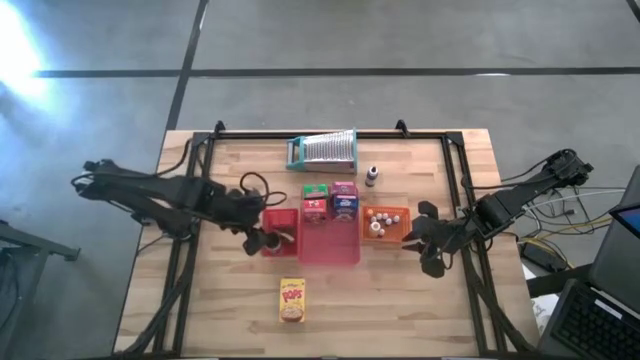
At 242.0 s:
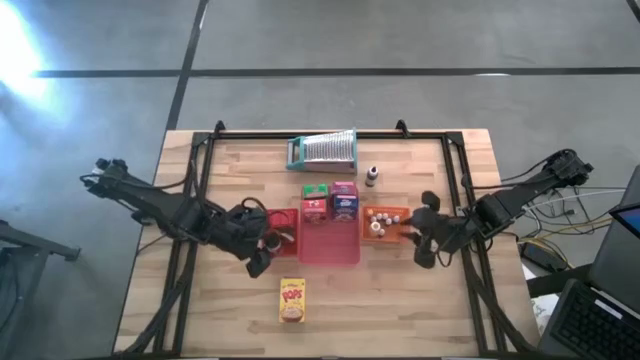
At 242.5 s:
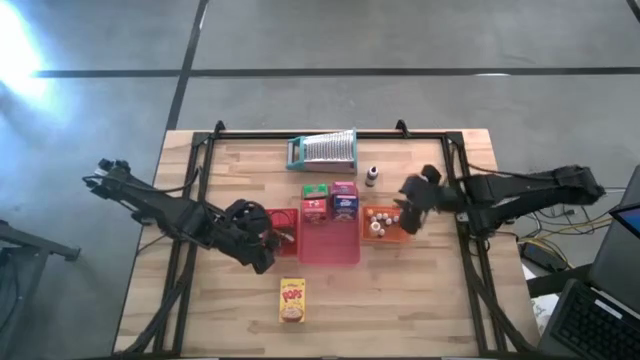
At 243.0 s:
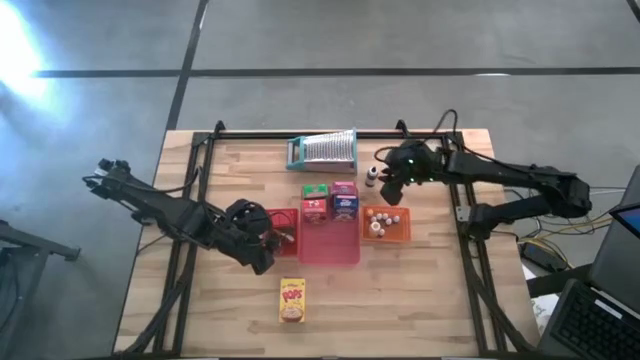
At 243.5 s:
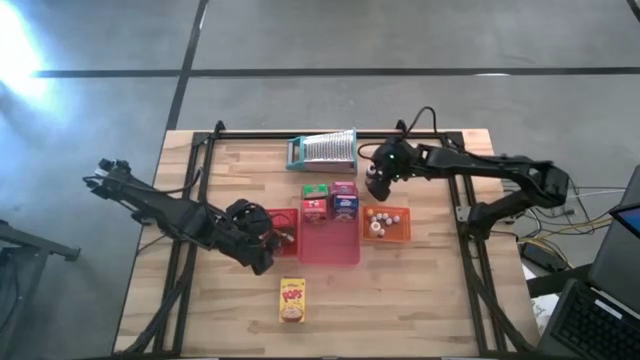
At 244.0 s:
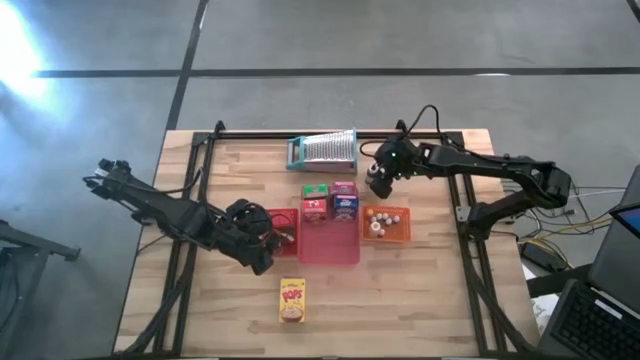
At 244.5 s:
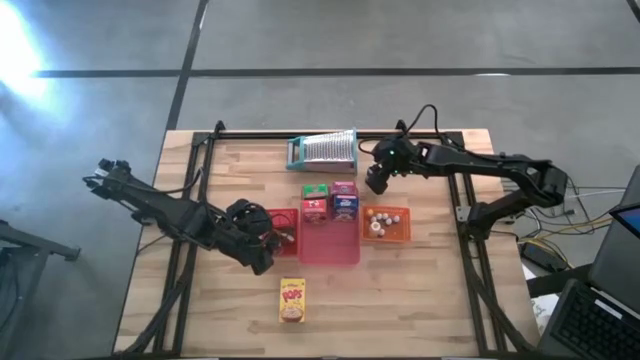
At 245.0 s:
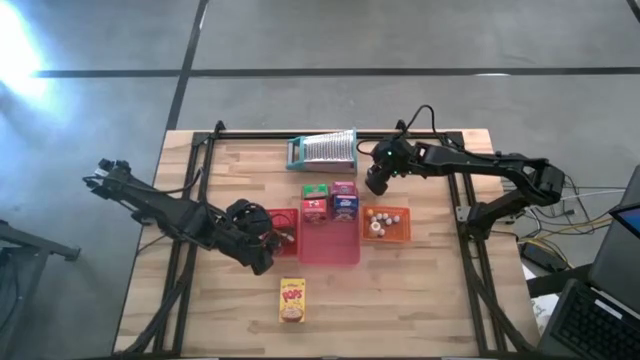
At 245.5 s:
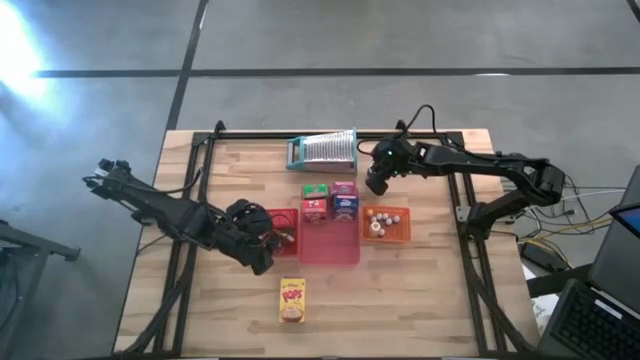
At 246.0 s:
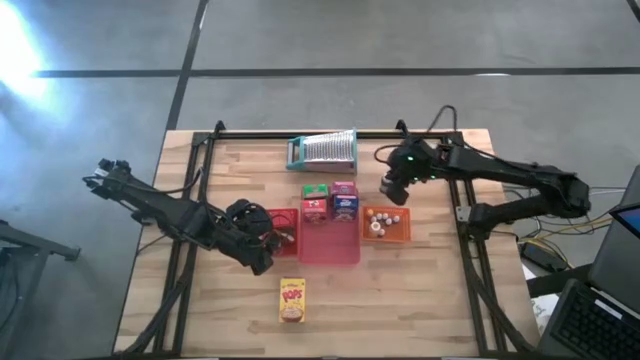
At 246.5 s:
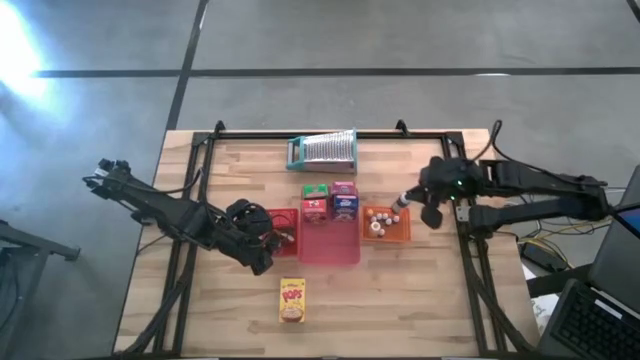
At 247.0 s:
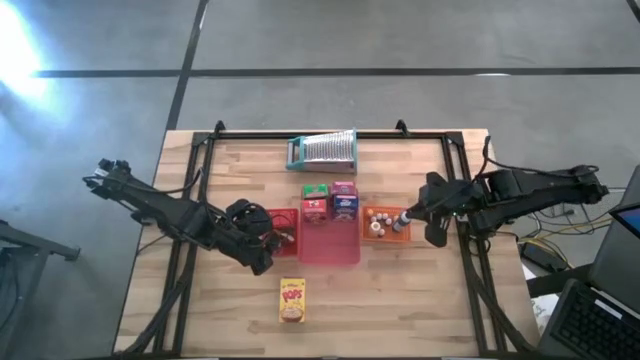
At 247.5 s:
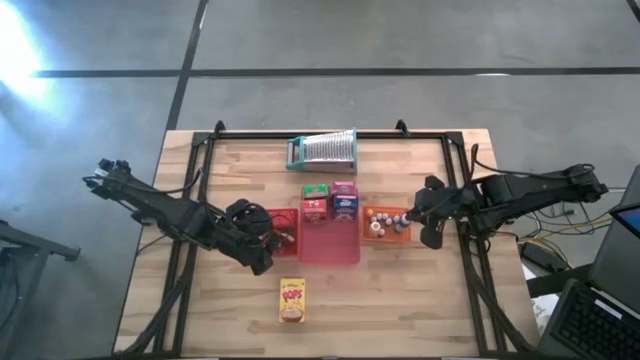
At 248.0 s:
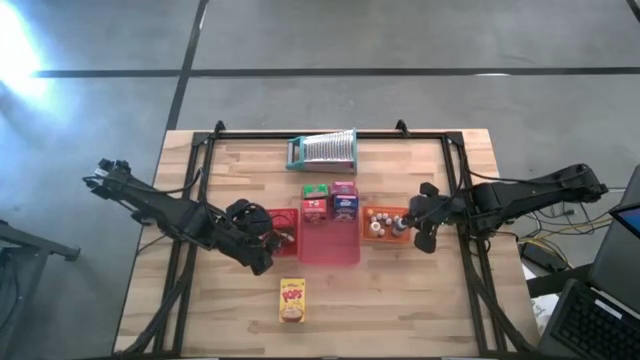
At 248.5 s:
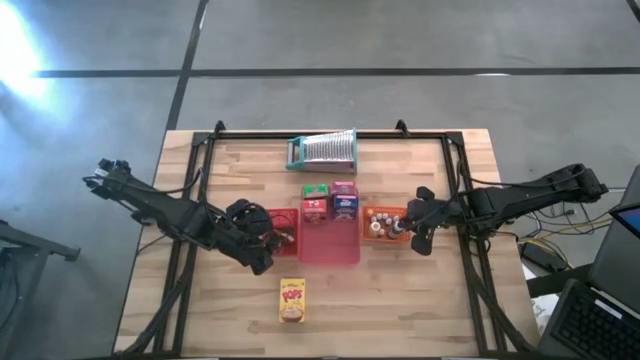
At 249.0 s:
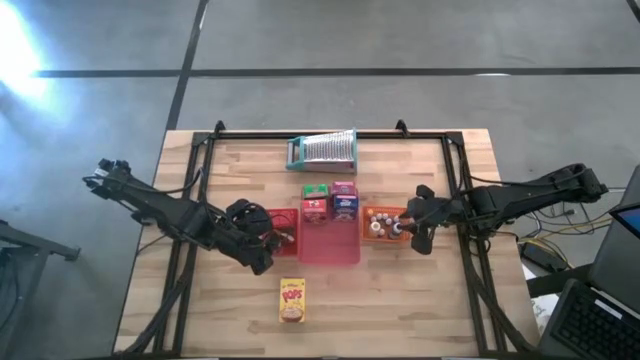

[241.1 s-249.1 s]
Task: Pick & Place Kitchen Items
Put the large black food coloring bottle into the orange bin

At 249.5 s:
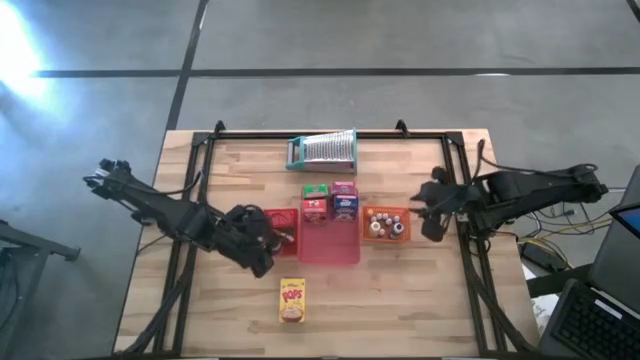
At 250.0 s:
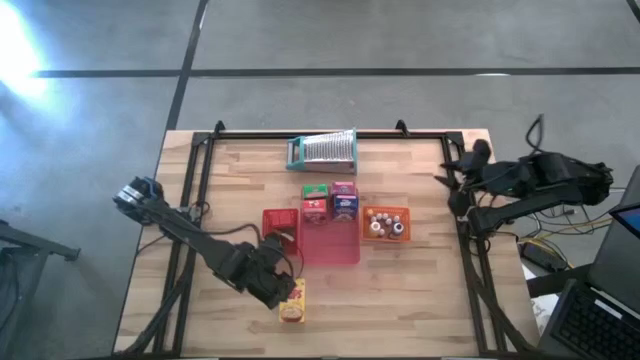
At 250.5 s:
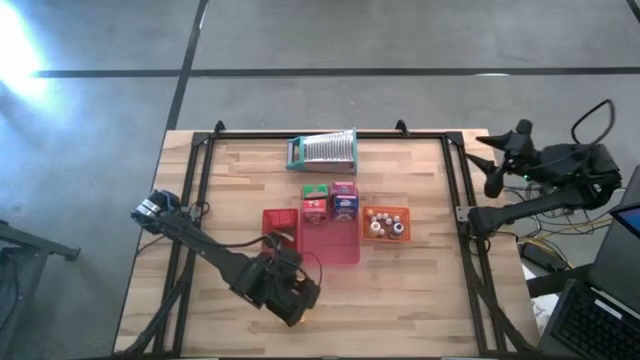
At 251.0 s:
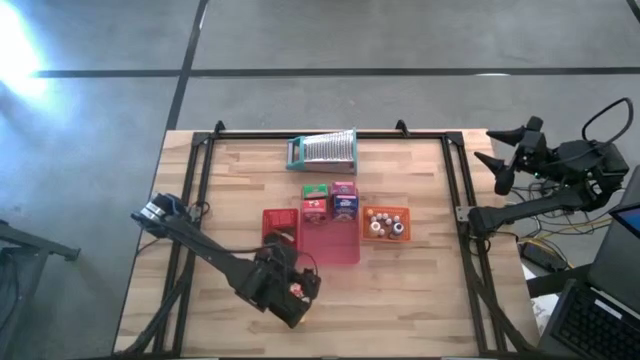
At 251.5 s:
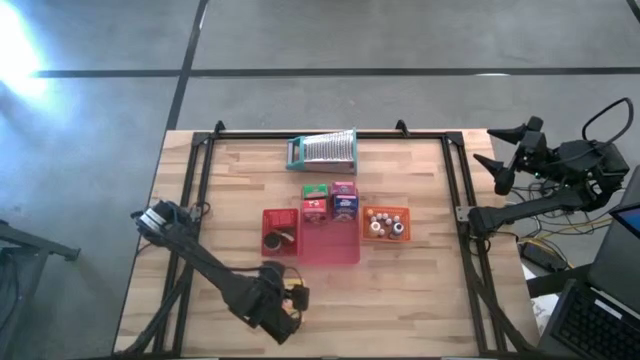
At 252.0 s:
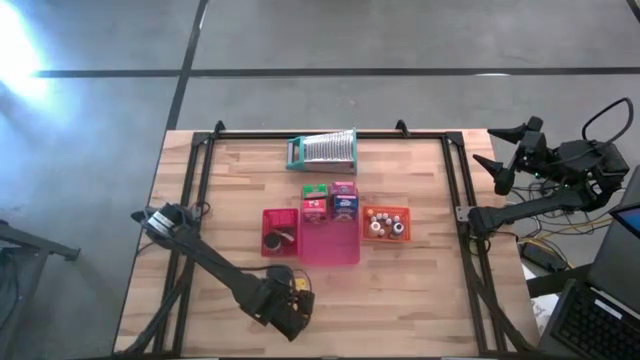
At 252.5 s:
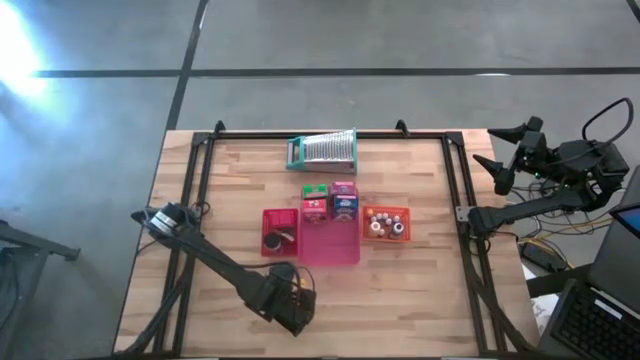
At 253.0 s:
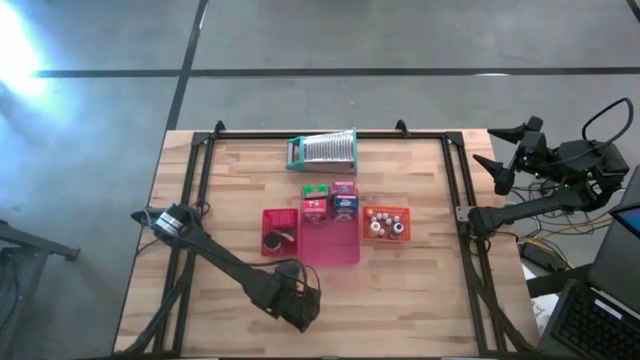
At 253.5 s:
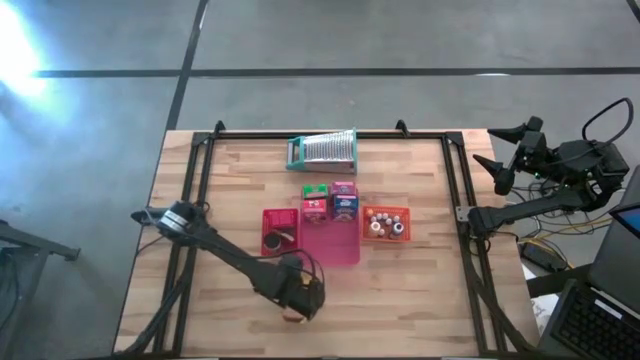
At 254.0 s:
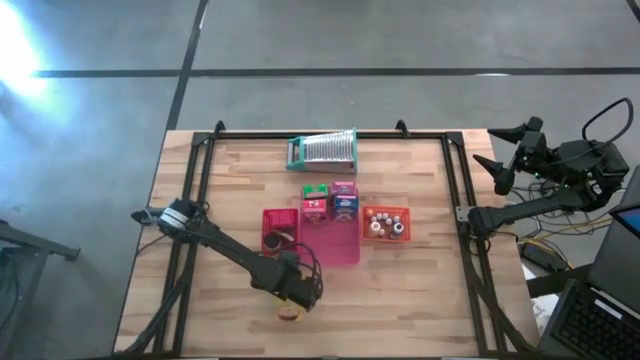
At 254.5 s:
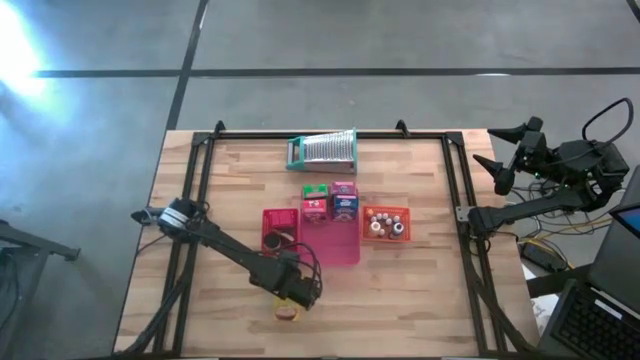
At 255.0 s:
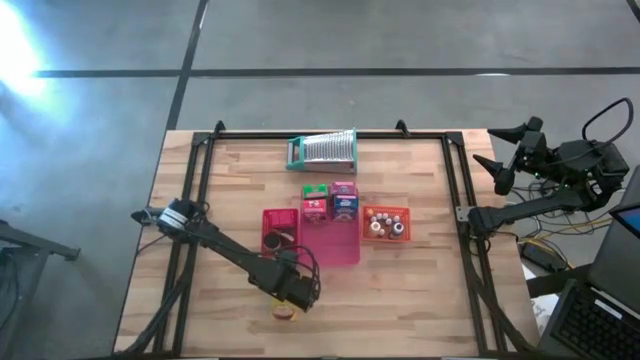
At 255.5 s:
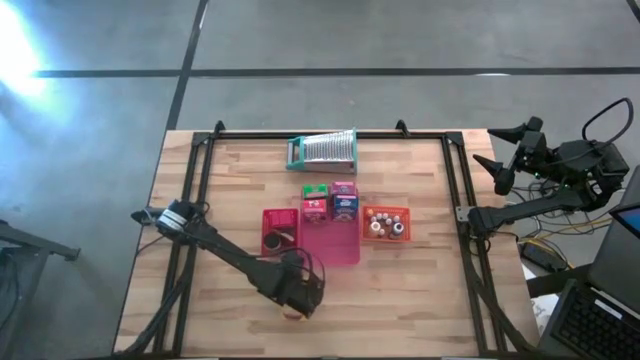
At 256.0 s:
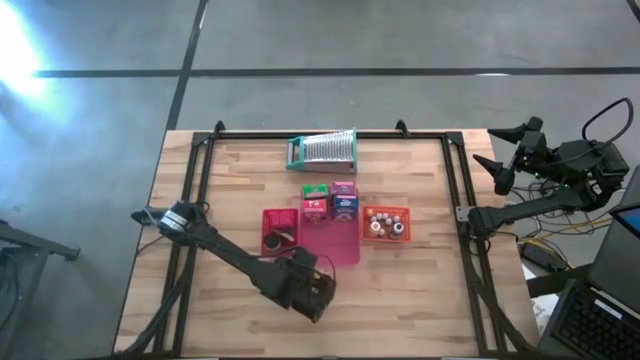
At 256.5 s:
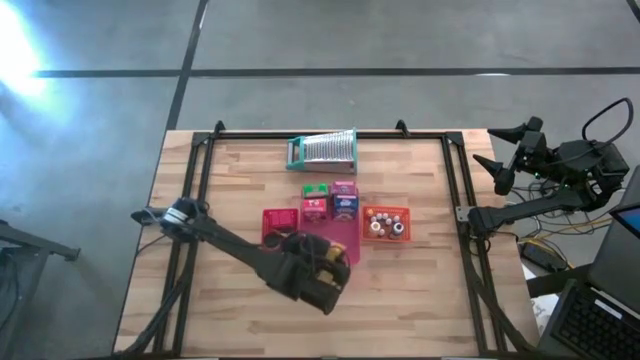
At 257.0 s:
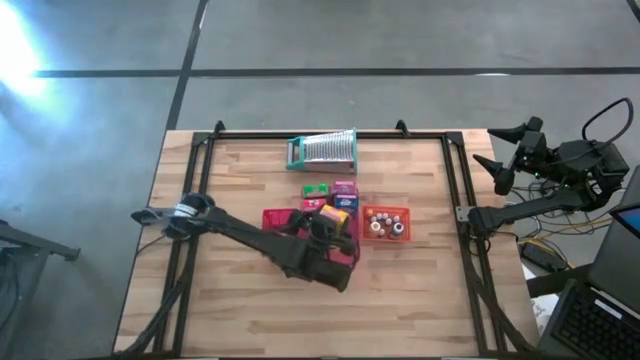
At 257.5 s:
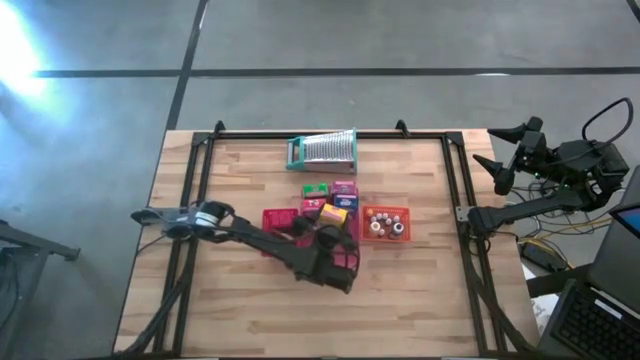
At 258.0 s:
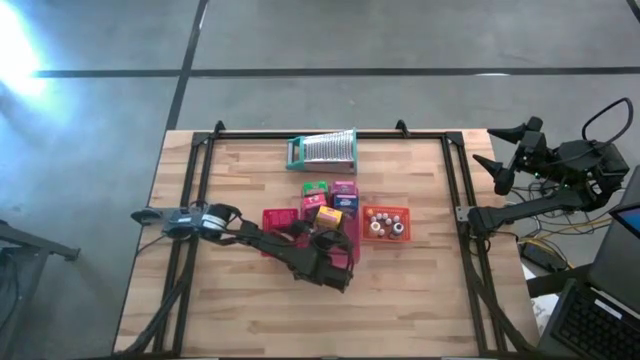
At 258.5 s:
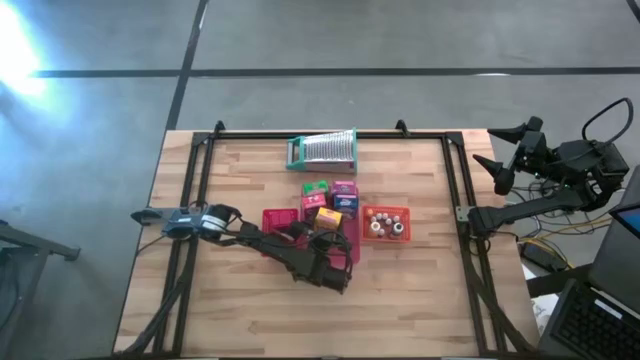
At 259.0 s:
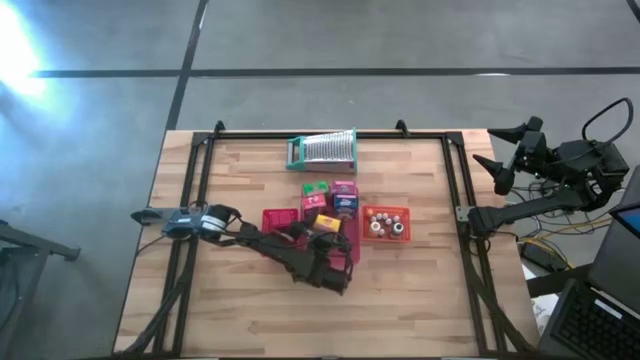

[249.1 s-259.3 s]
Put the yellow cereal box into the pink bin

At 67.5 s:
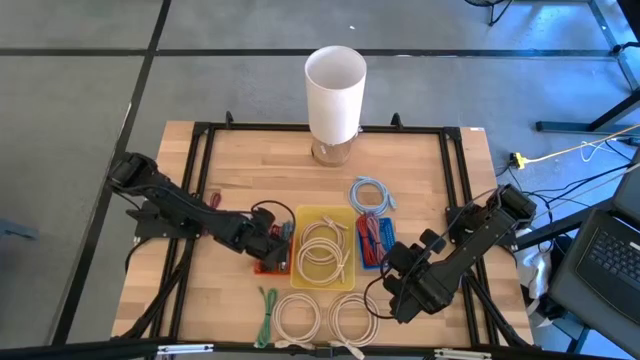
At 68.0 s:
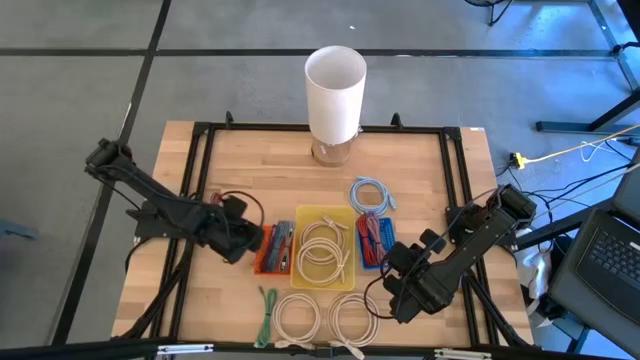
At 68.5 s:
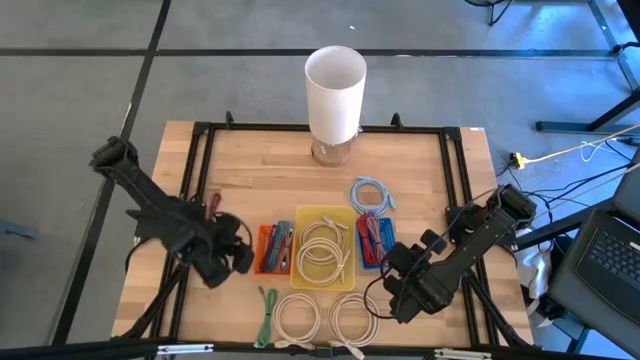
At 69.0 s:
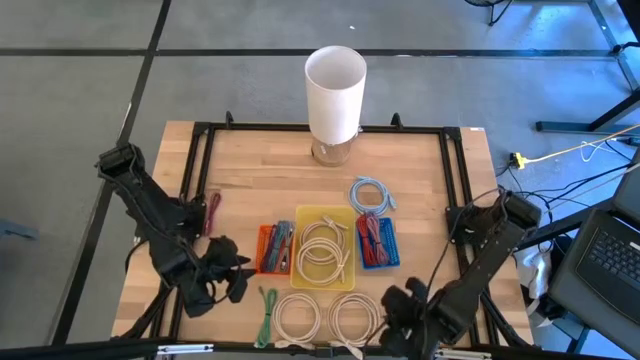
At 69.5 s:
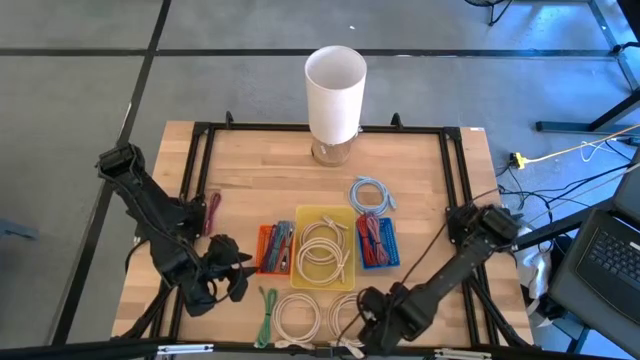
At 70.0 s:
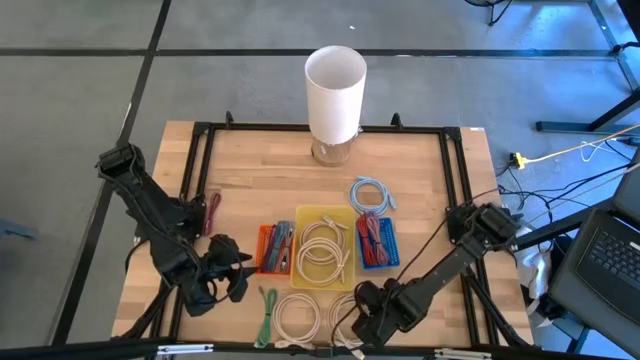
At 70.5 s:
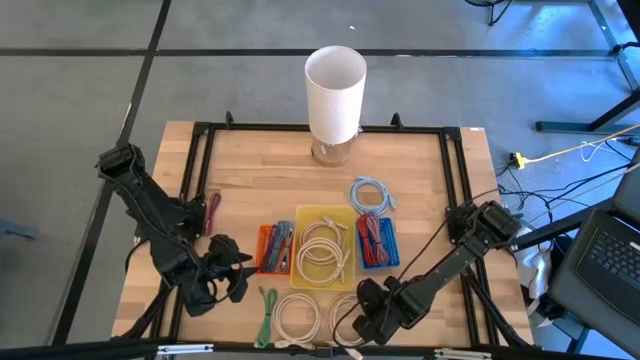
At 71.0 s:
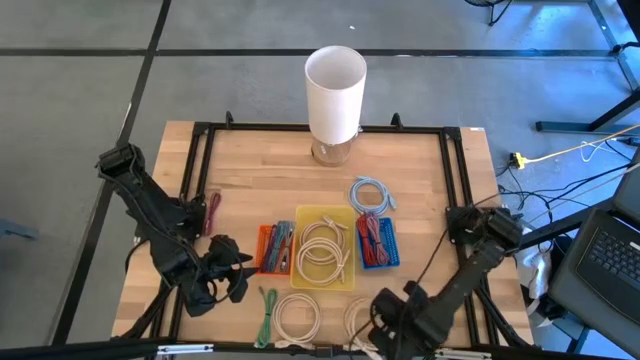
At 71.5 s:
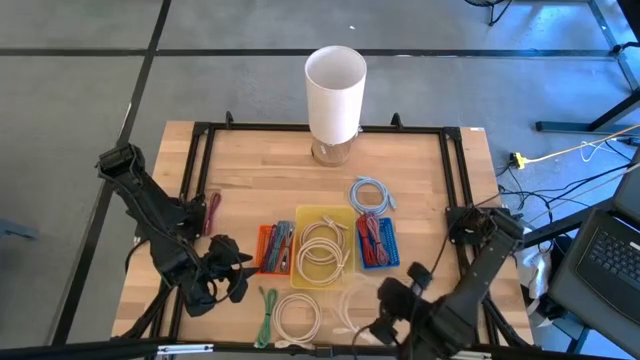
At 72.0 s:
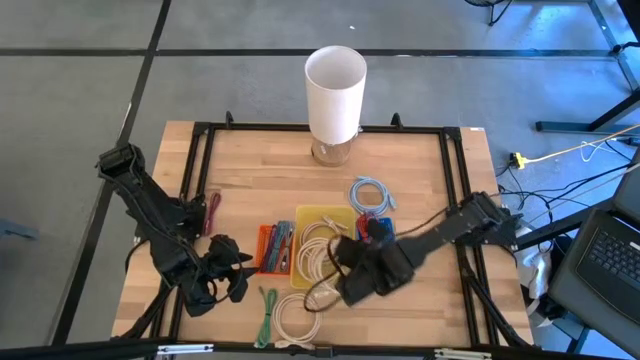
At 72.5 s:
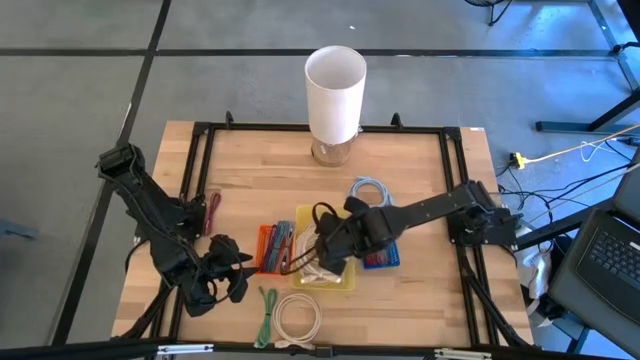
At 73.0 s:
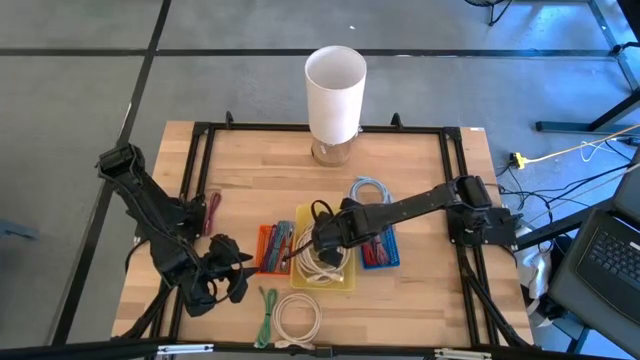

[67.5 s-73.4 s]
Task: Pick & Place USB Port
Put the brown HDMI cable into the yellow bin
